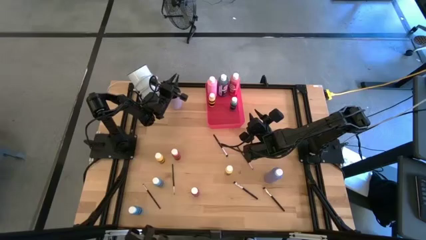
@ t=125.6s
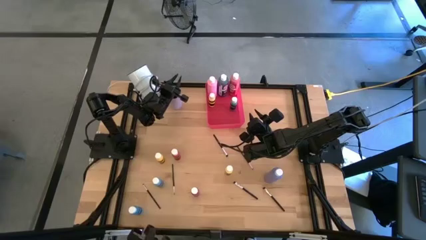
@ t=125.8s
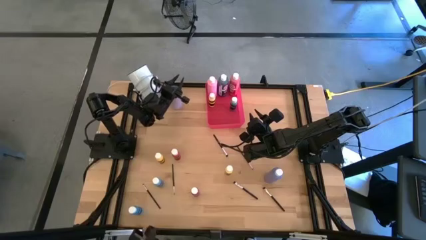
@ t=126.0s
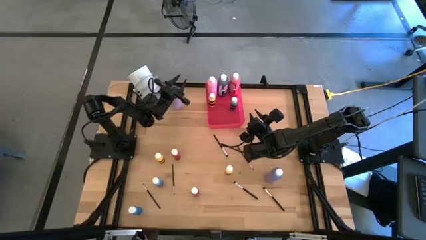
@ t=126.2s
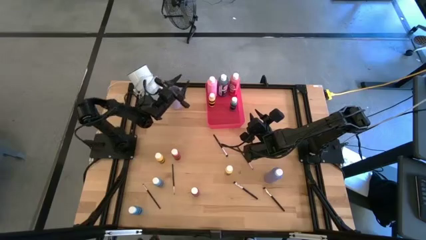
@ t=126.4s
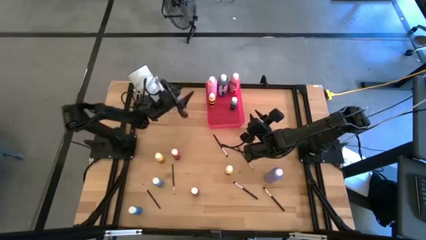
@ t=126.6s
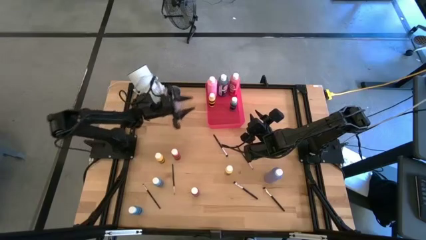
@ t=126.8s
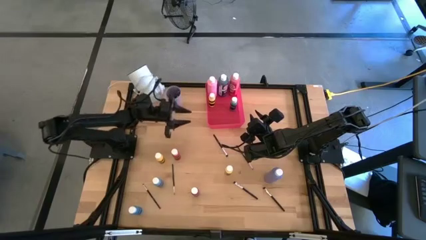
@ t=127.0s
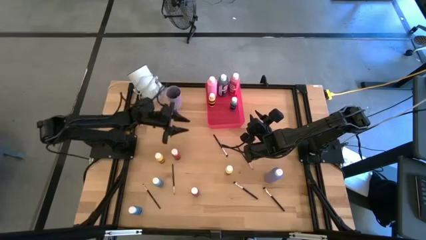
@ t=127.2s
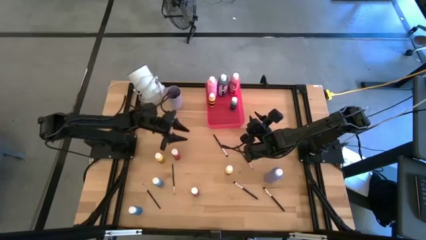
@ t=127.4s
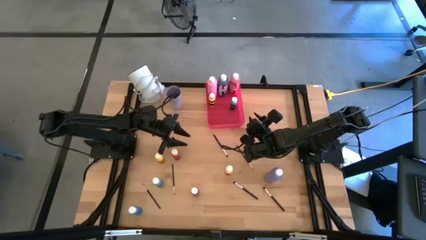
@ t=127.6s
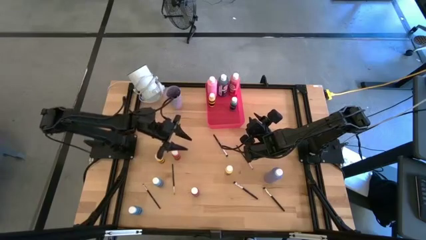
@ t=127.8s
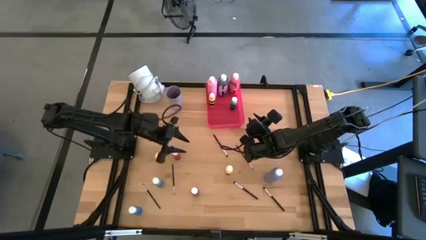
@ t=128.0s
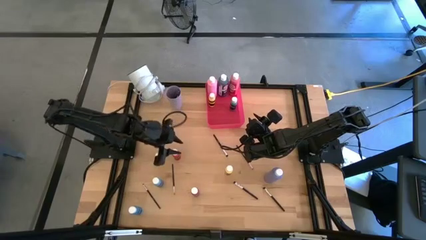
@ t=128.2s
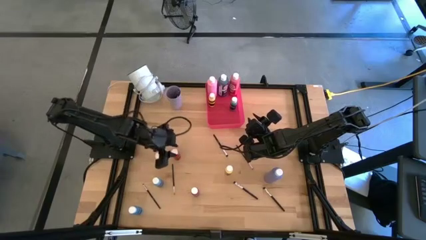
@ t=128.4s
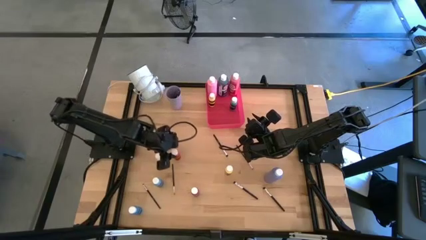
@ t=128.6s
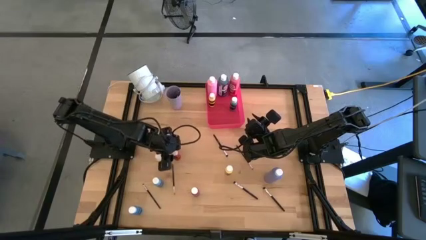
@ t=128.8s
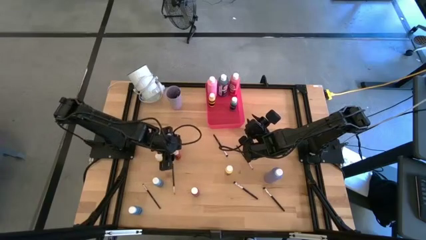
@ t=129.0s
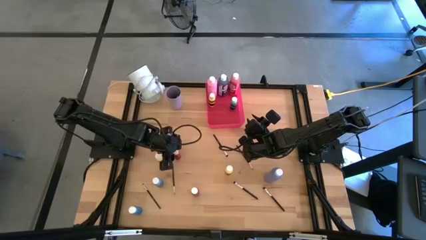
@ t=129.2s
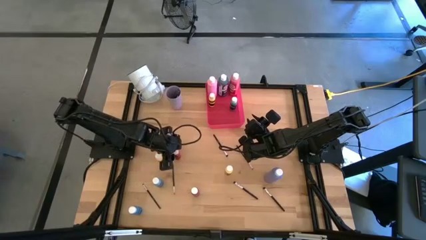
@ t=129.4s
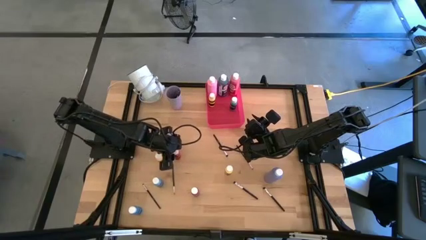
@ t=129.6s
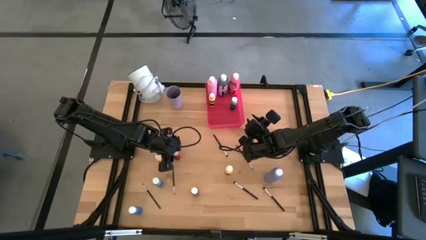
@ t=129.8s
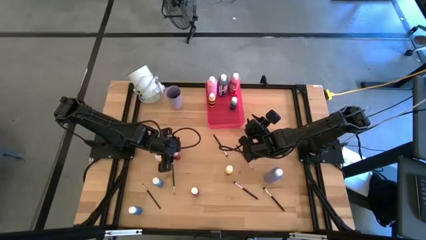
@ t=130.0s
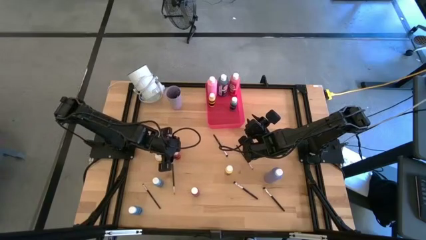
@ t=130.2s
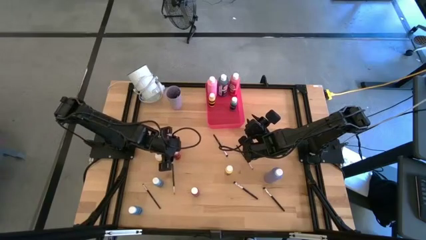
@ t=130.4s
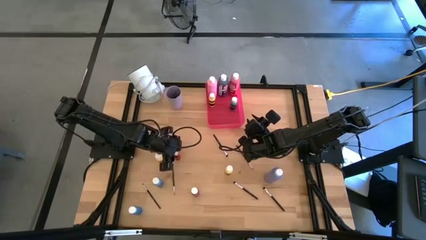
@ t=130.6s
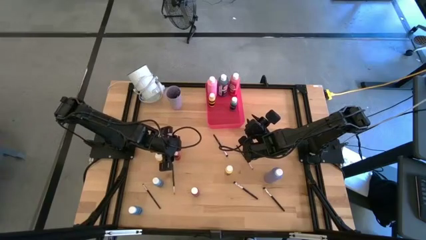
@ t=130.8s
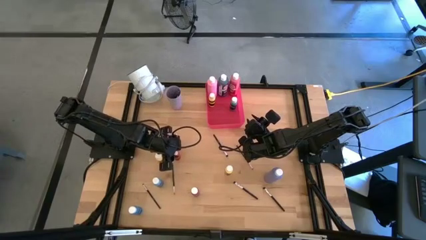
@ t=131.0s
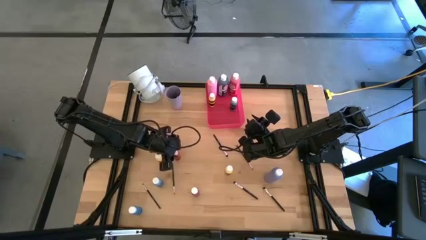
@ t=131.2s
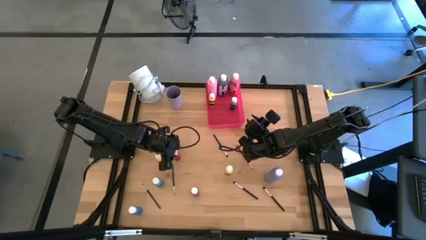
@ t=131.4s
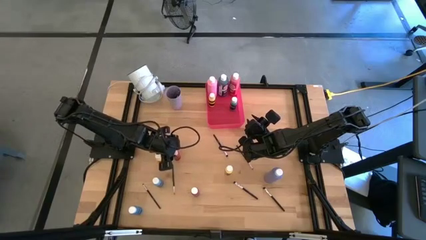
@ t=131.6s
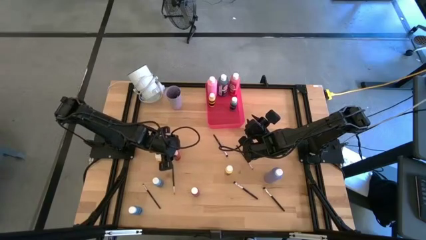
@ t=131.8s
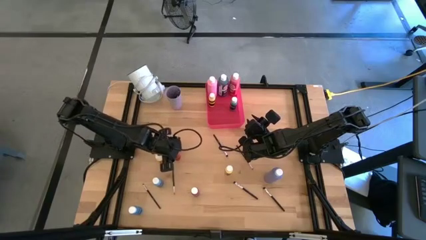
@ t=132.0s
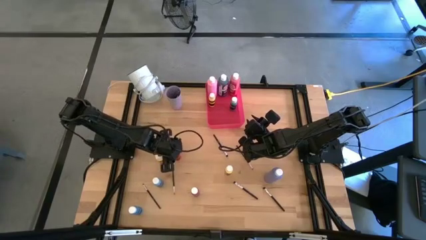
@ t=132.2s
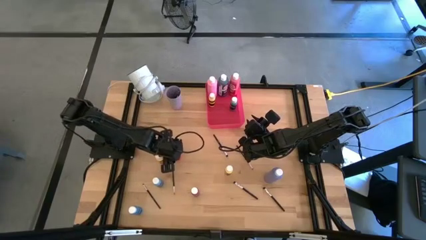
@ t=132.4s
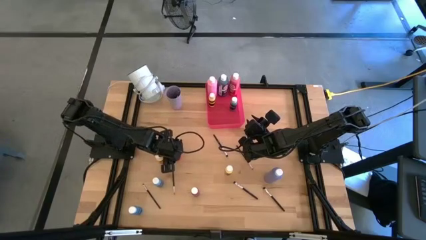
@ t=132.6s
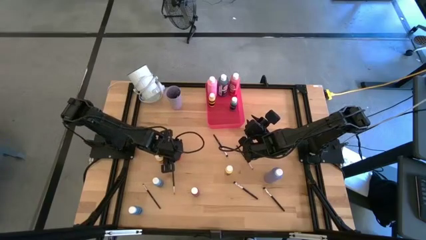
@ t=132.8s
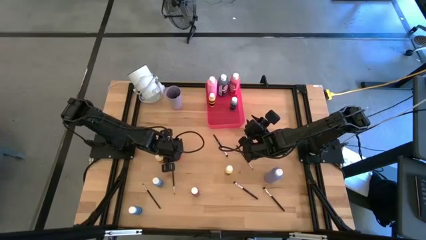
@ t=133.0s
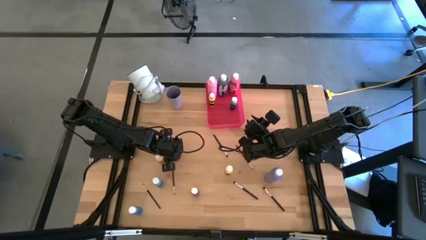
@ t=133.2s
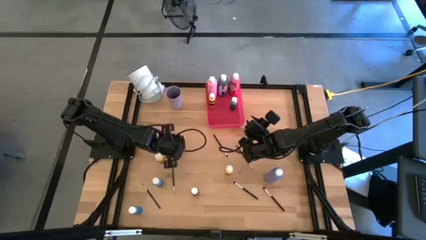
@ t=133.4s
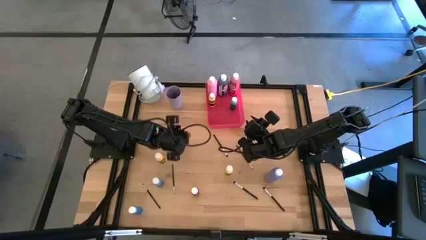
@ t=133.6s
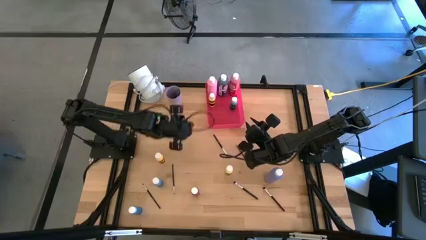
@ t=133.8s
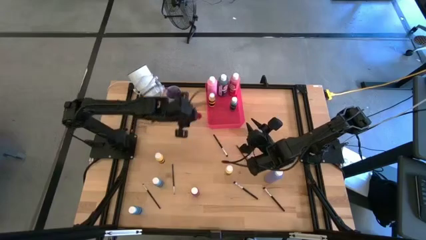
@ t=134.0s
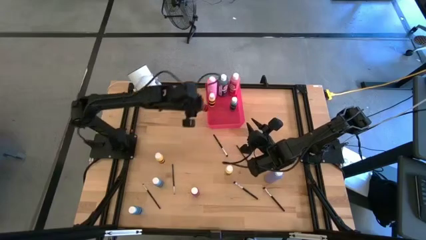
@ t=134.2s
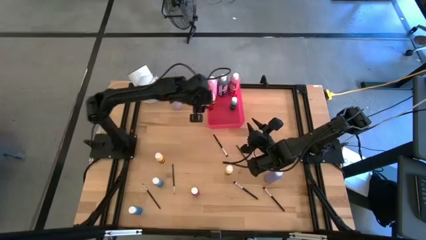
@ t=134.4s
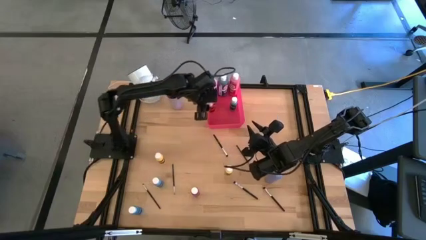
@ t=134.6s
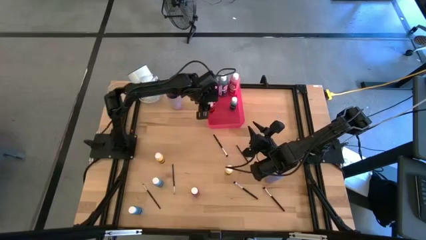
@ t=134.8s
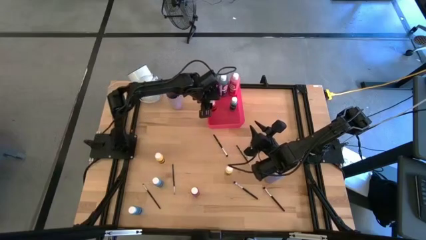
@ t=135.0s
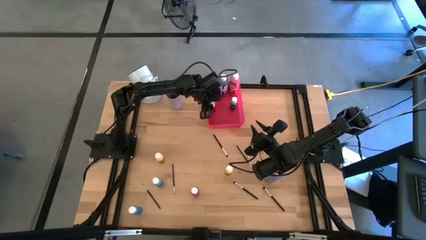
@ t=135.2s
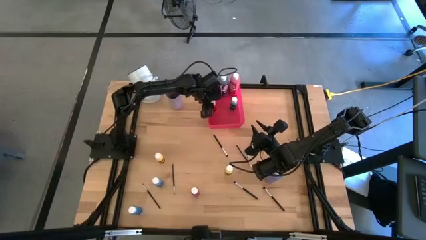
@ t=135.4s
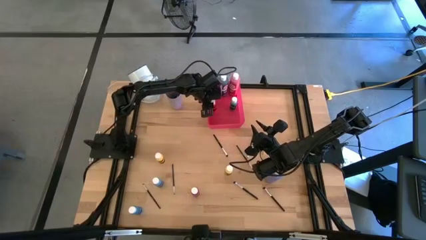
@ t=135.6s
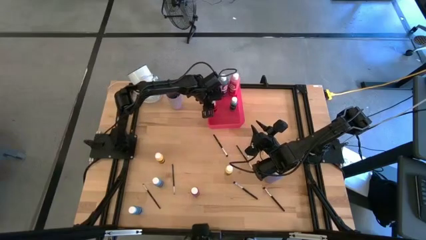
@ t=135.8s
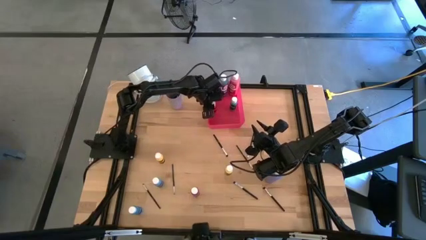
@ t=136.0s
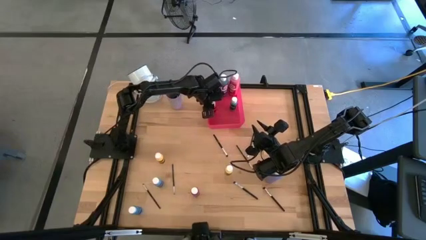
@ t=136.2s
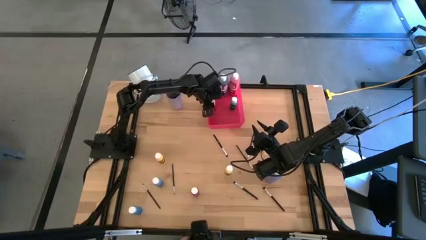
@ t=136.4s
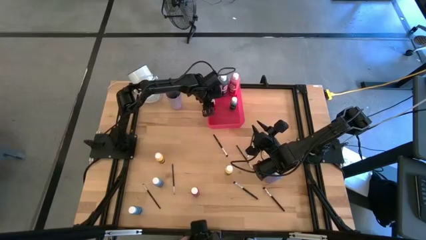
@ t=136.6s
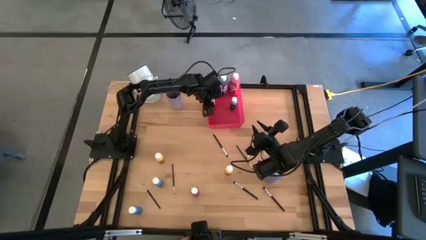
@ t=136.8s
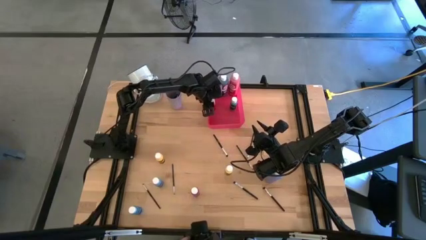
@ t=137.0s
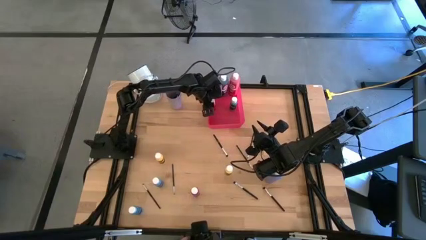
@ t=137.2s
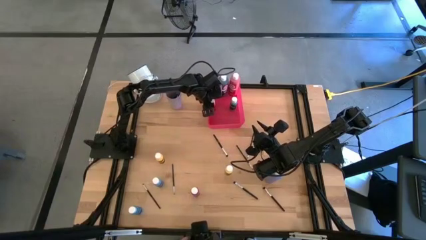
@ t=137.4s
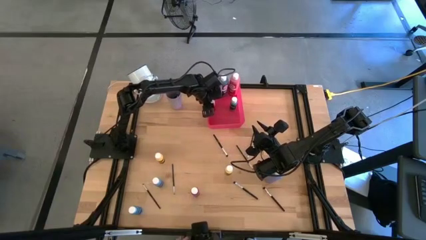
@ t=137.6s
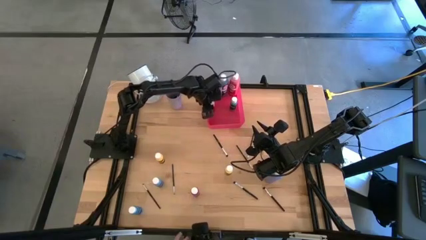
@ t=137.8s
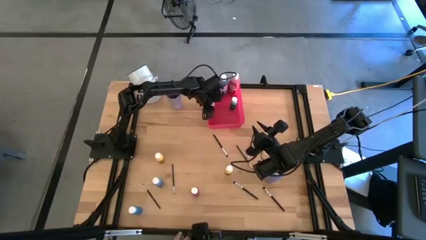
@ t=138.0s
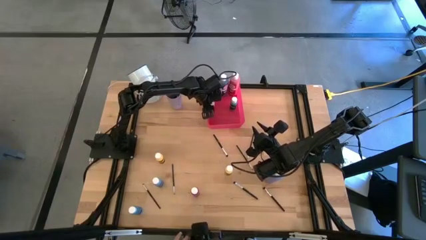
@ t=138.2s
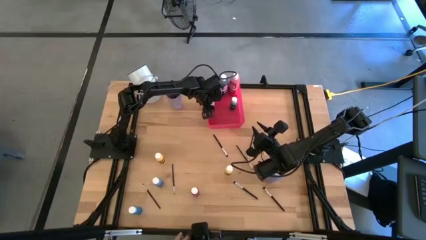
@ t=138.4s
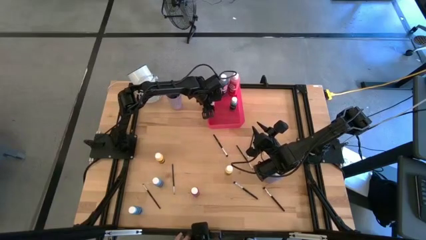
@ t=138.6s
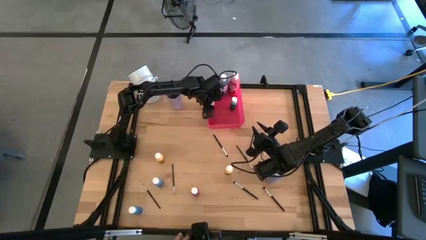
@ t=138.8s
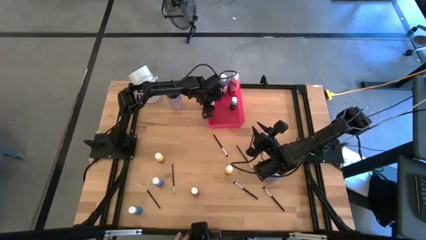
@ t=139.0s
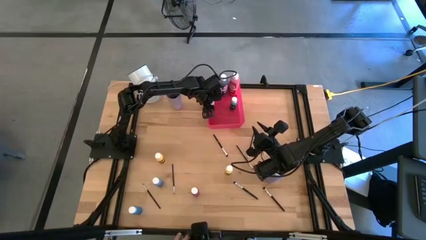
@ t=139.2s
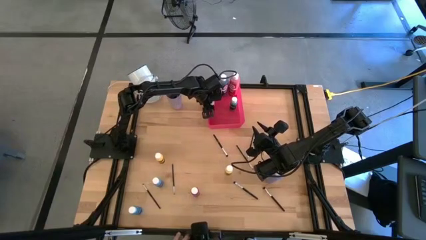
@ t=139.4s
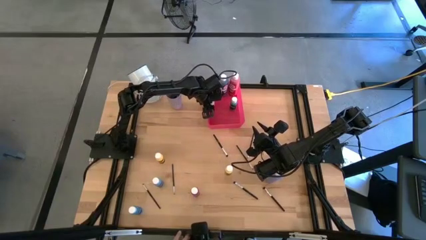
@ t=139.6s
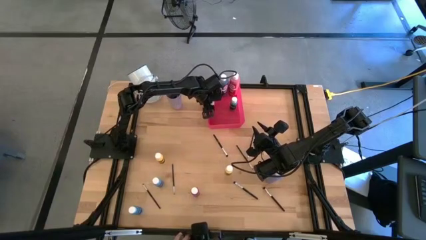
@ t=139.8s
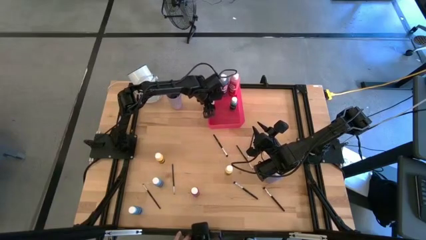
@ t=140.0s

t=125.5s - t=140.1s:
Task: Pick & Place Paint Supplies
Put the red paint bottle into the red bin
